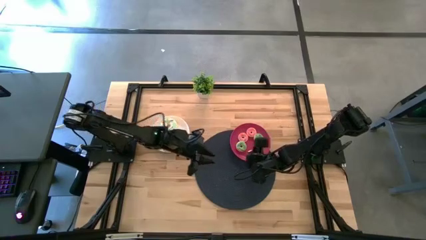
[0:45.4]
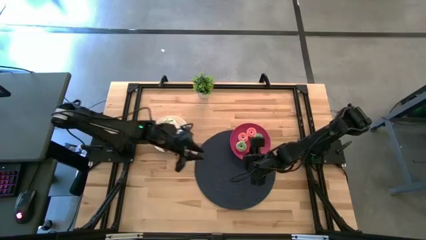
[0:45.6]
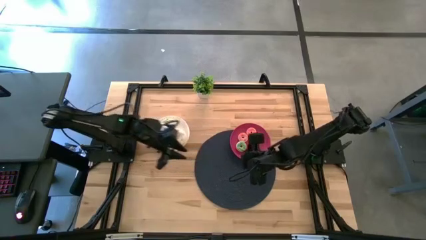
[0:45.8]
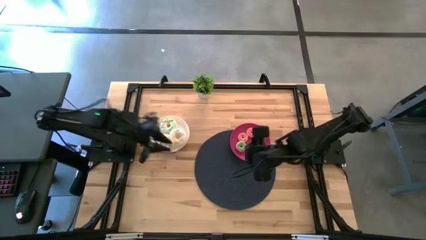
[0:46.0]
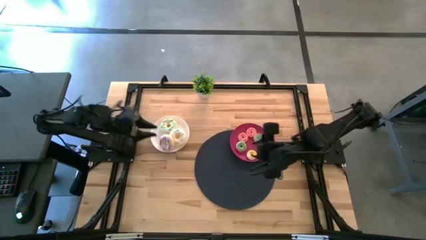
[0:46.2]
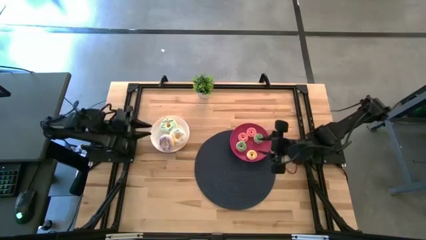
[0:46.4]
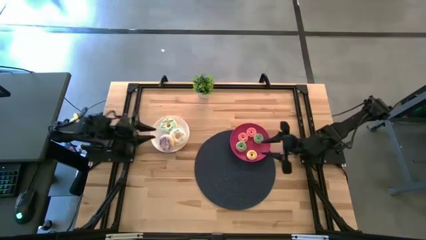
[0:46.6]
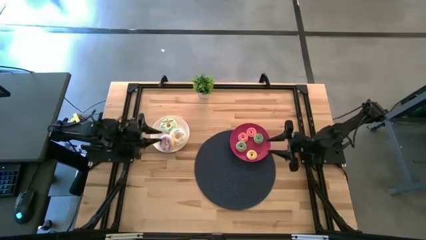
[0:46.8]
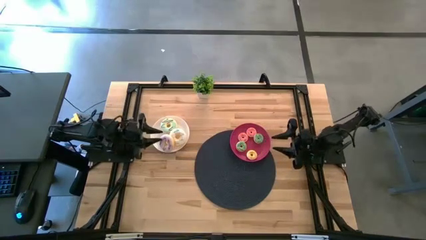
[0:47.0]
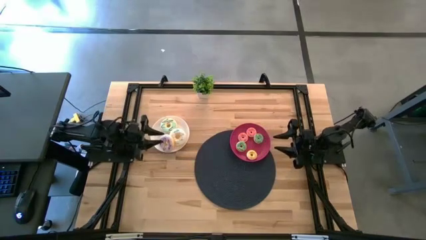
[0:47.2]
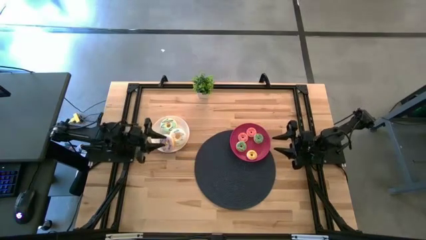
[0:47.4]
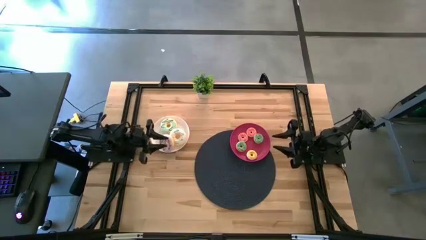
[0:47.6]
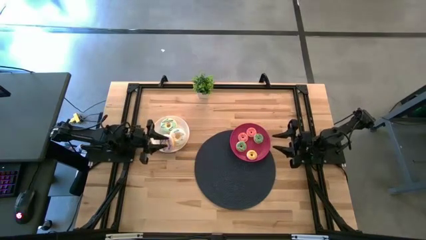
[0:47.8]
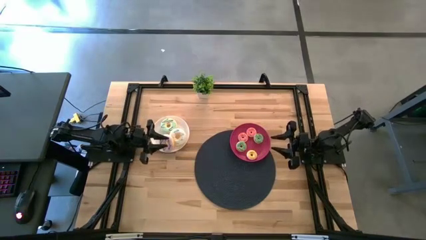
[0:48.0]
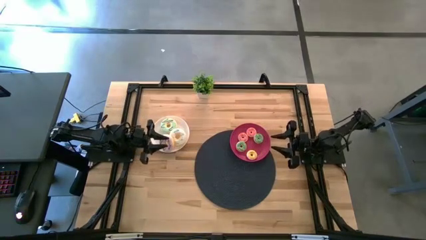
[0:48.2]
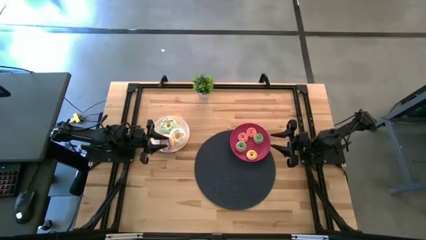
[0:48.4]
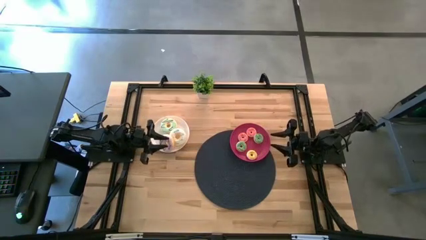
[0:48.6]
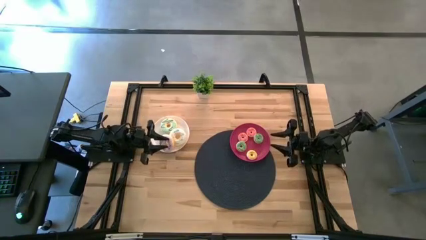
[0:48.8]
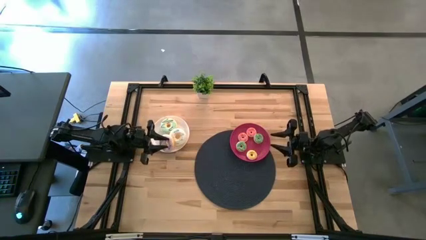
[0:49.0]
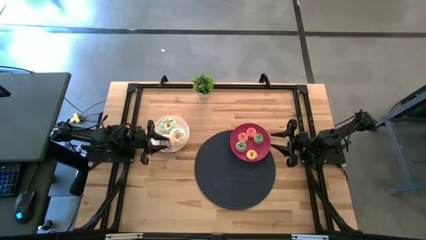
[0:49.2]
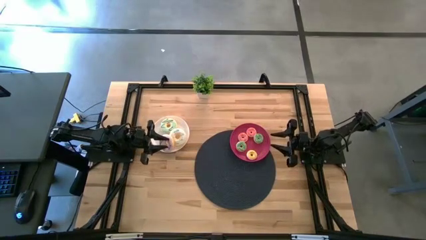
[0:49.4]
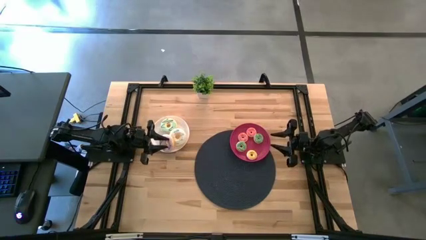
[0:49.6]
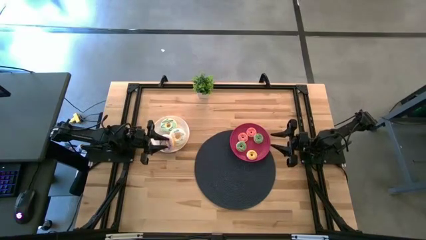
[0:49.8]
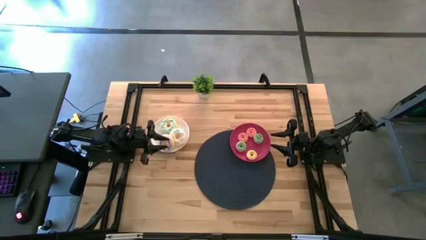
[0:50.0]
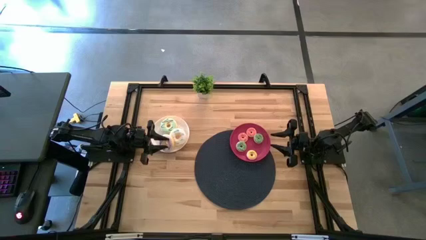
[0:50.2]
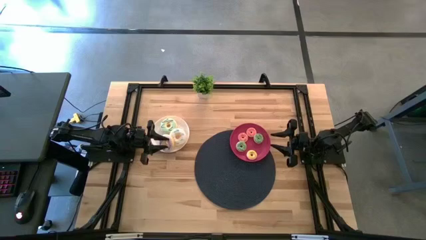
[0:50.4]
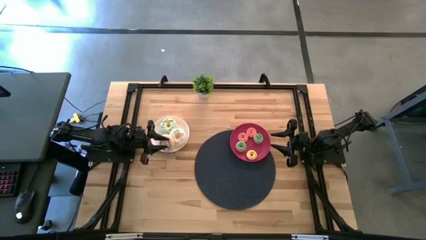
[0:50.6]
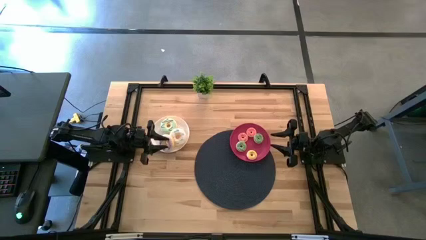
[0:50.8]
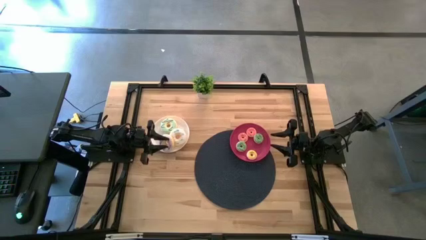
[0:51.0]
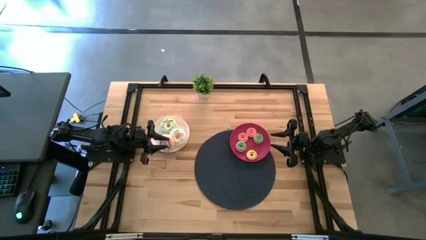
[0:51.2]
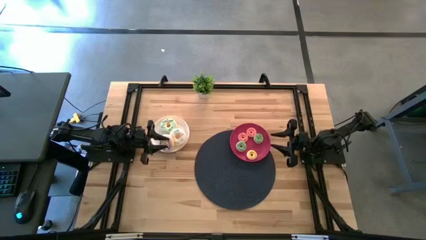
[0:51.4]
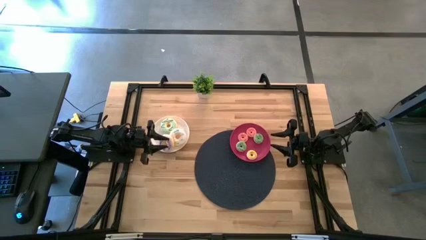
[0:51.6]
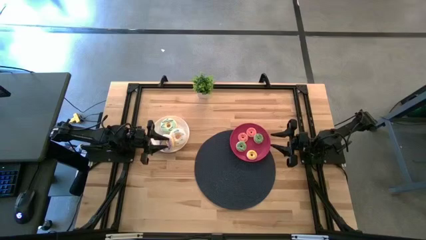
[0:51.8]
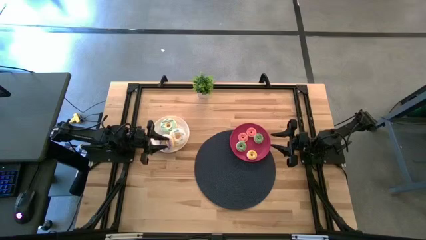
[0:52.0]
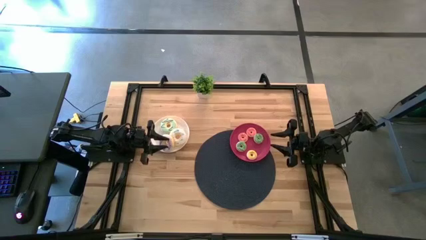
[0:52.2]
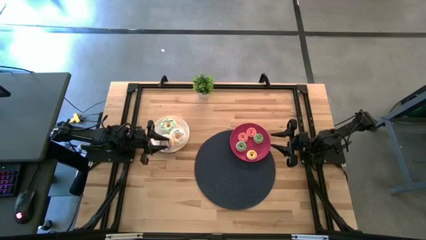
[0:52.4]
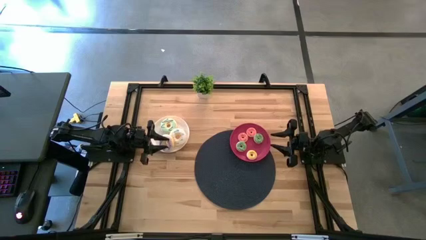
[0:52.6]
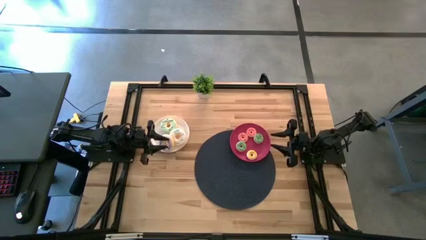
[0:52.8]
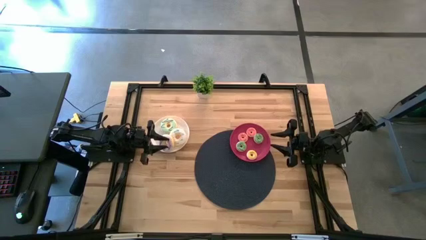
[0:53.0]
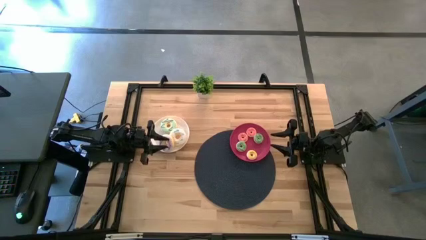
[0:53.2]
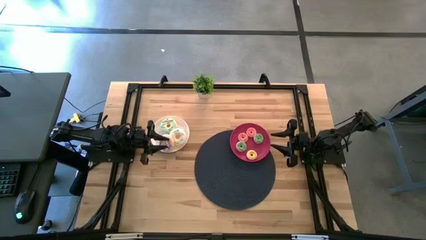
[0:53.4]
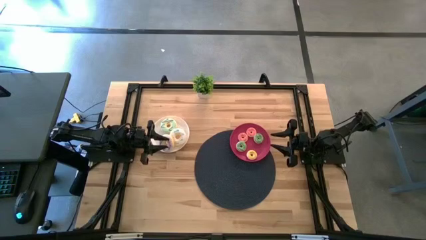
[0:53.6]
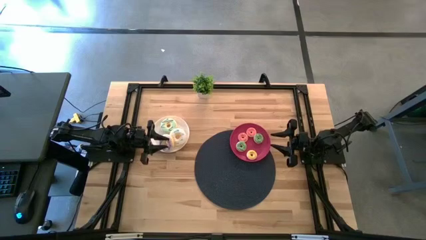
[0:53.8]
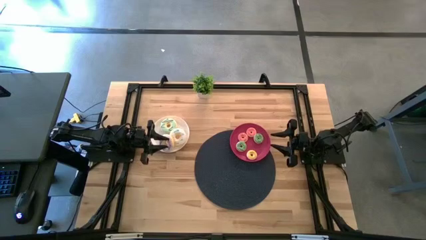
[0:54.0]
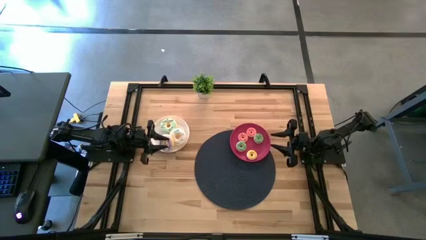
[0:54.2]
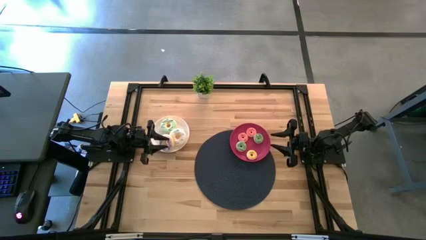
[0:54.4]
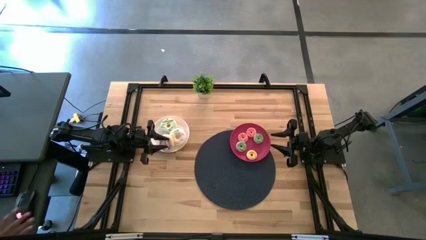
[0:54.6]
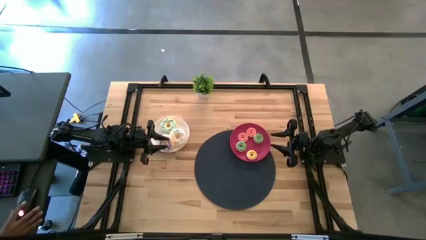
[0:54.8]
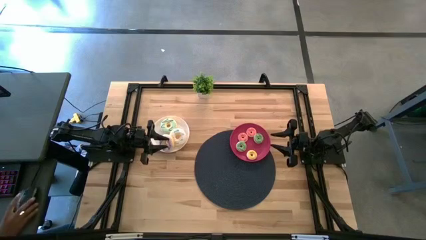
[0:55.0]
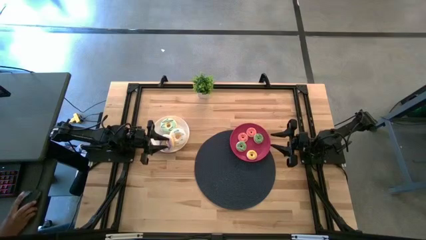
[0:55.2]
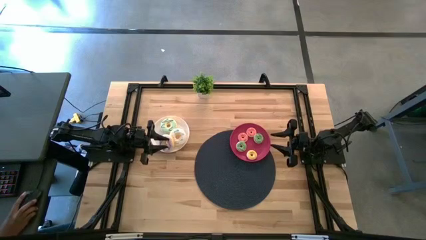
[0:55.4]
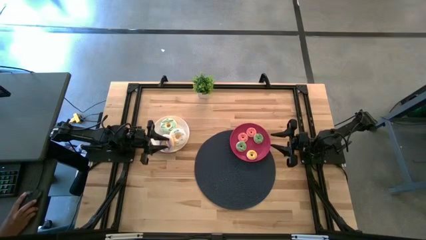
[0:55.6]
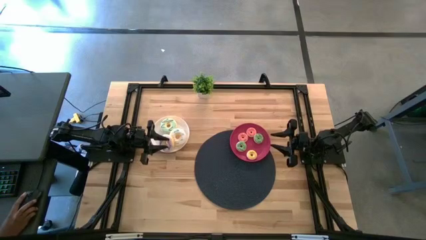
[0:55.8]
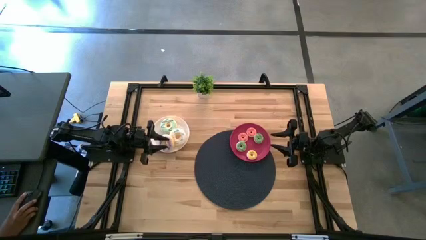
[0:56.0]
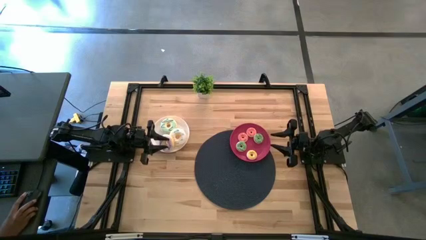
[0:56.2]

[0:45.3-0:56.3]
Task: Pick & Place donuts
Return to home position
